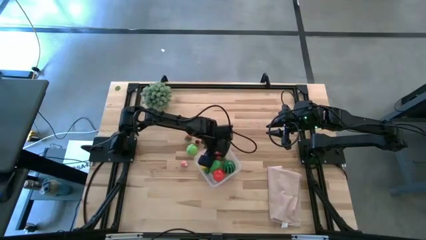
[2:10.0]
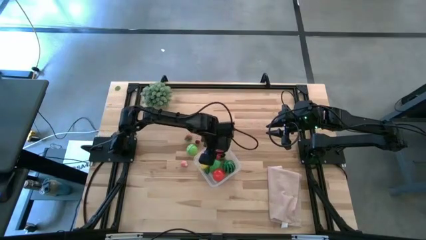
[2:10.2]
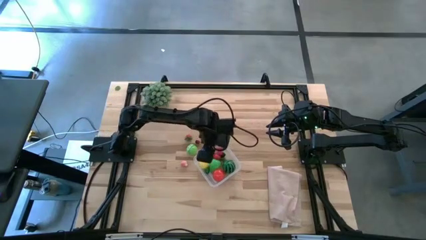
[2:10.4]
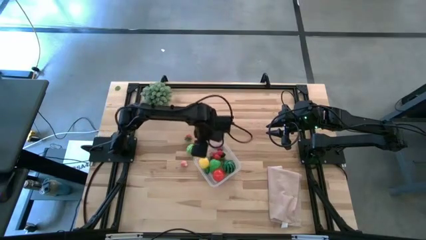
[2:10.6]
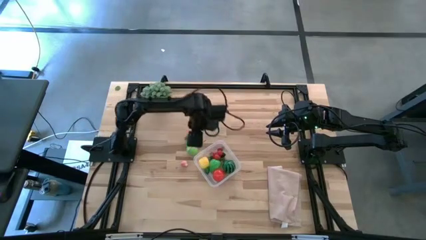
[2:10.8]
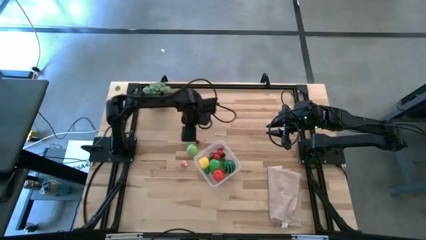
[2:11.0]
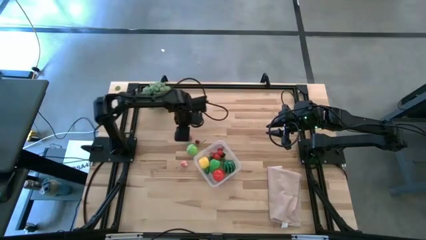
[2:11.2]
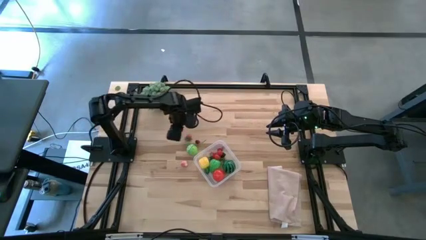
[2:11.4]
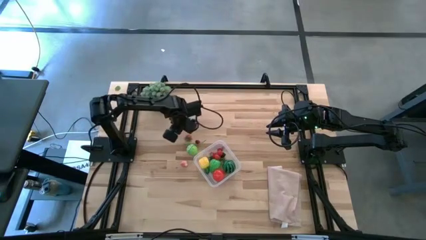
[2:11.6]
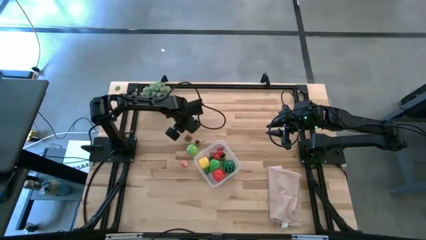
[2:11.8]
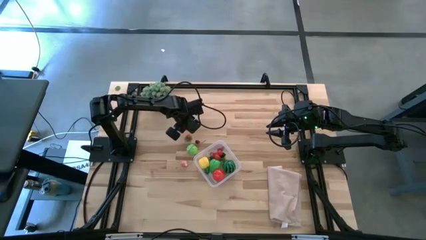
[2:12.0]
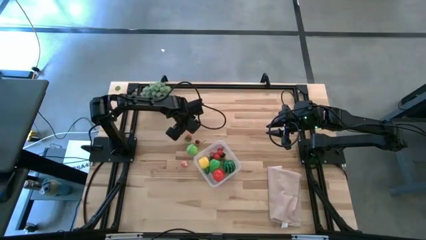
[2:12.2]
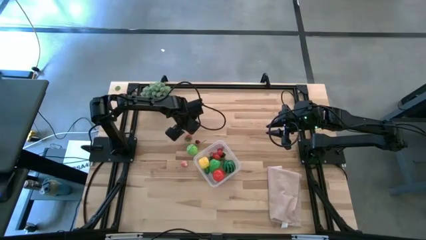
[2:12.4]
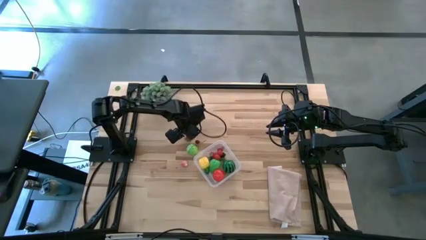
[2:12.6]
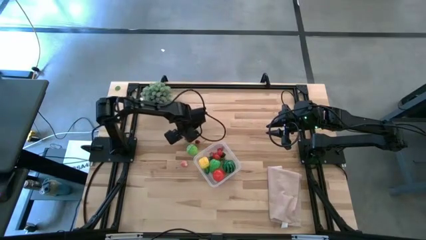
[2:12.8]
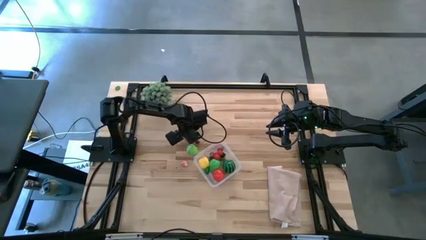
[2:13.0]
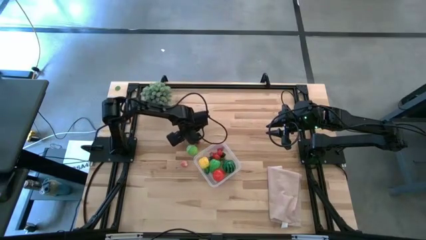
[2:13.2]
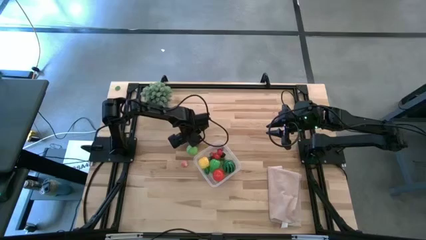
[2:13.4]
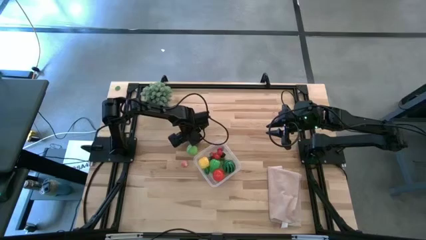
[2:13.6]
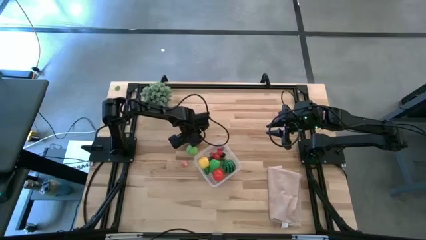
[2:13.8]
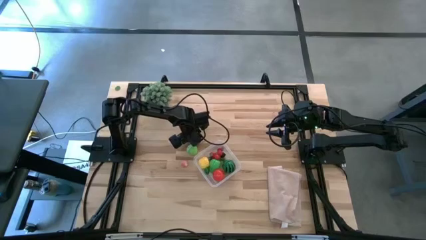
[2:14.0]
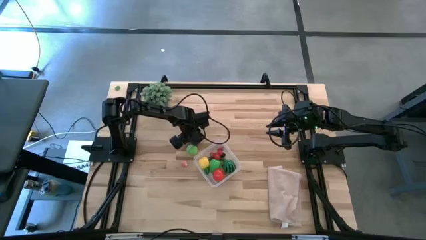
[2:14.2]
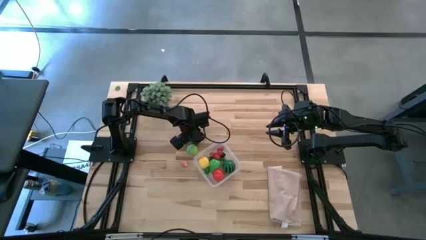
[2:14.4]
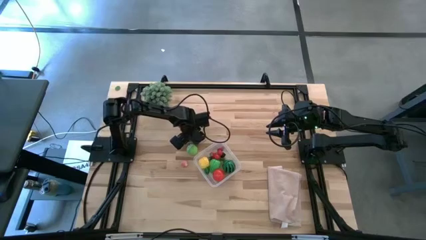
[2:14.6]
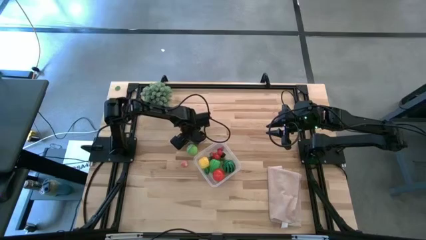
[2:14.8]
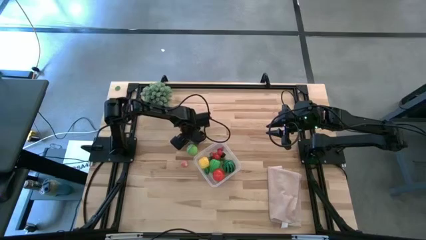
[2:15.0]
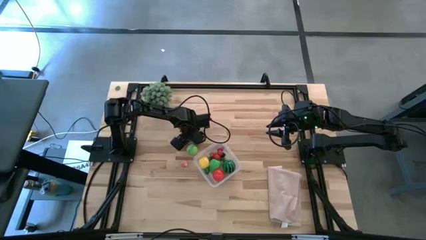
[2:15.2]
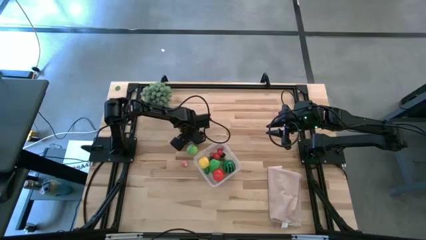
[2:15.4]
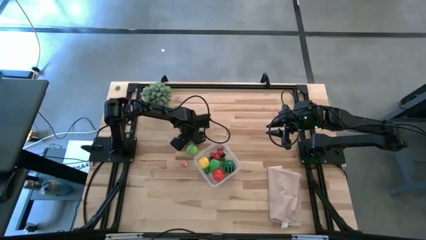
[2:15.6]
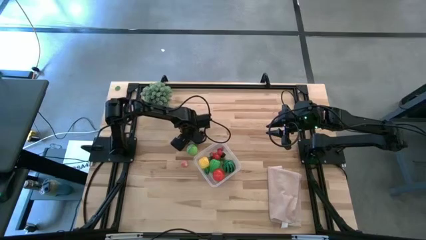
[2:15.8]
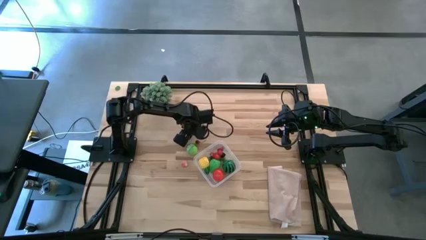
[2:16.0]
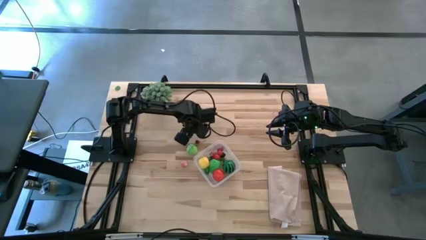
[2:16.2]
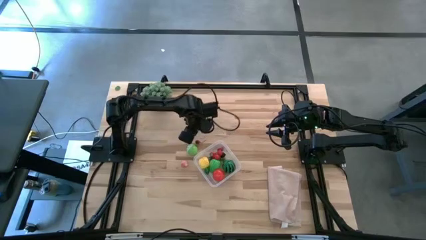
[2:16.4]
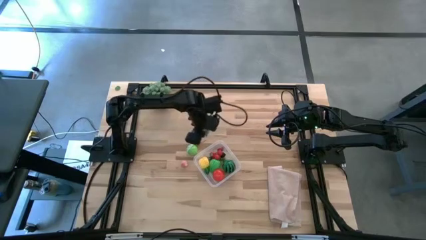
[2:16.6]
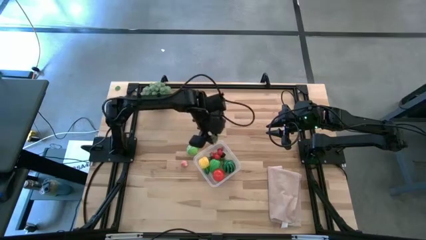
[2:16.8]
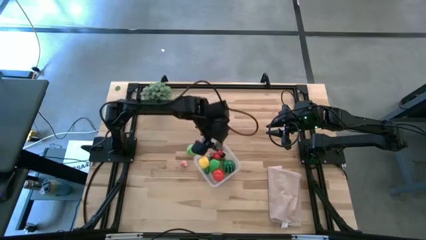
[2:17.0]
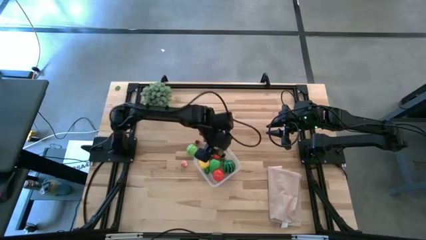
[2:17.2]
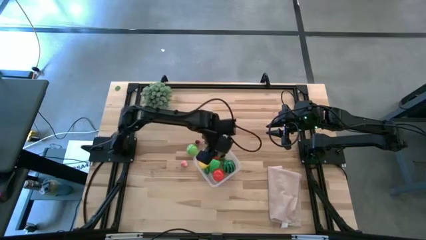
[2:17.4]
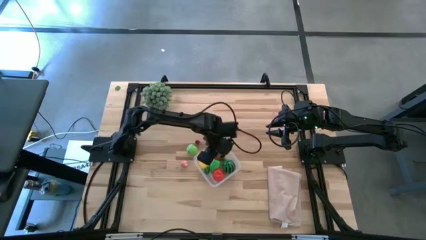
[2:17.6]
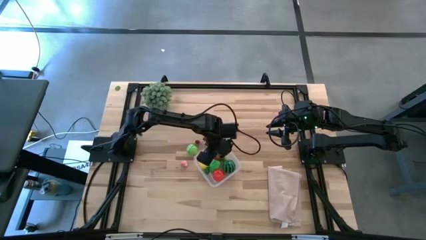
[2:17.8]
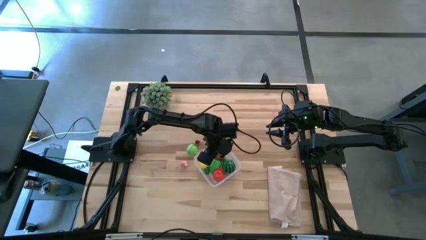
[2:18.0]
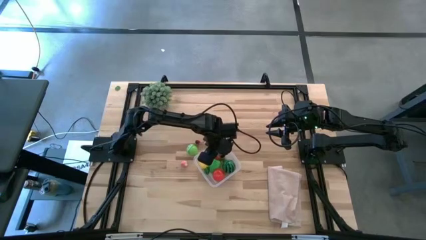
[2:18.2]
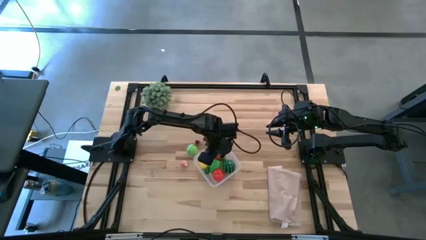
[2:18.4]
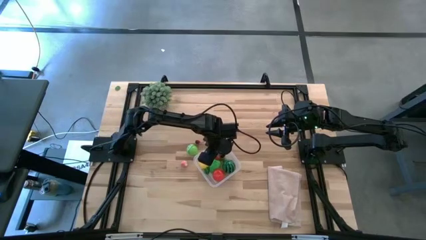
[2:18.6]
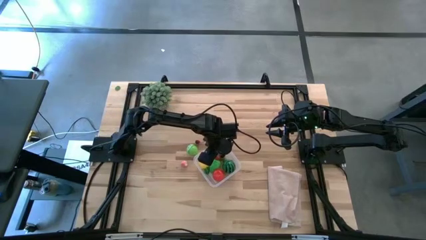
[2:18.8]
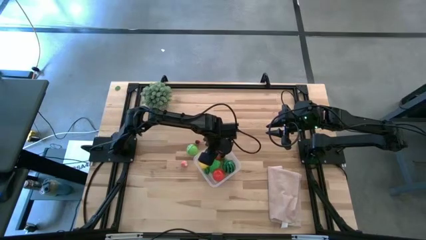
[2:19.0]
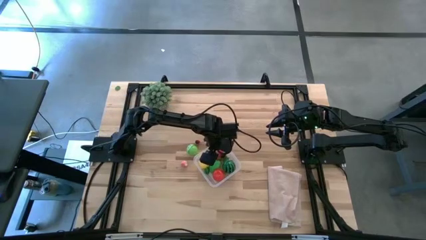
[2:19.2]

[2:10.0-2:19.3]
Task: Pick and placing Produce into tupperware
Put the red strawberry into the transparent bin
